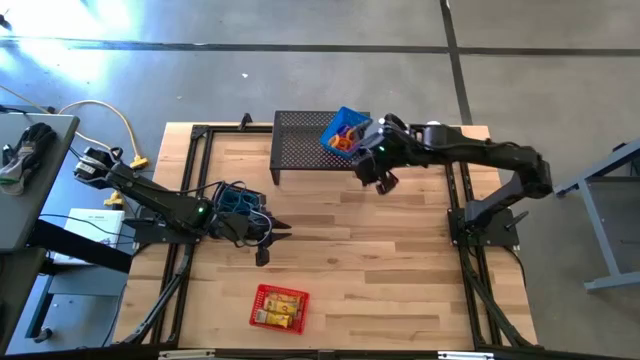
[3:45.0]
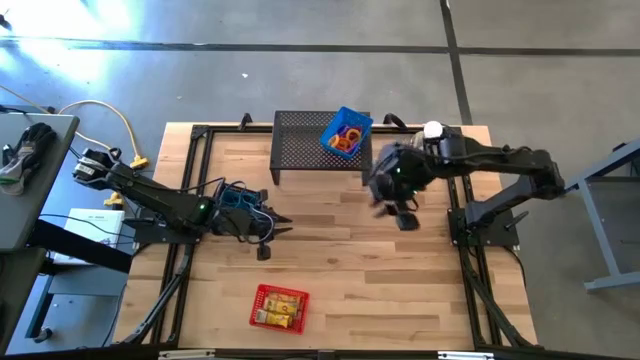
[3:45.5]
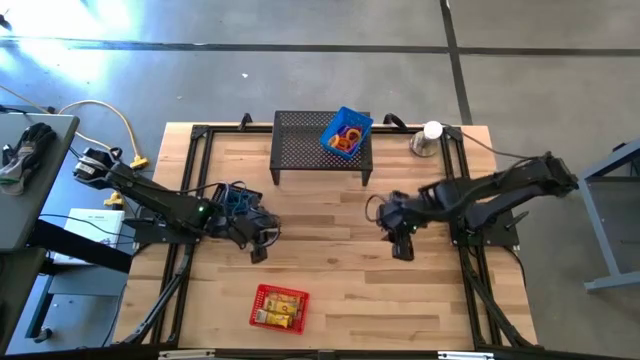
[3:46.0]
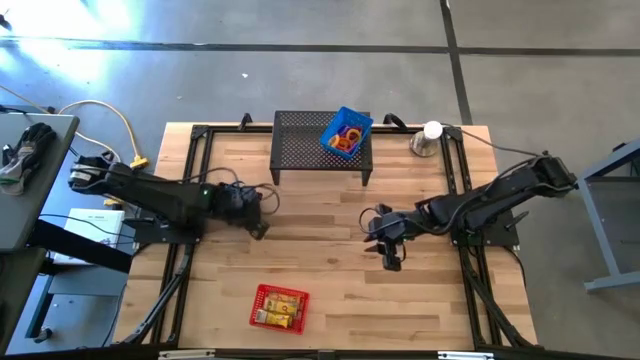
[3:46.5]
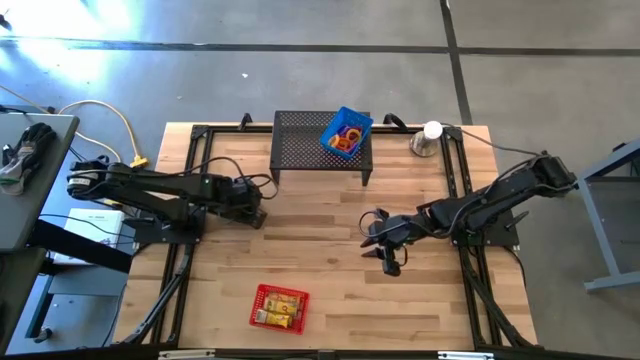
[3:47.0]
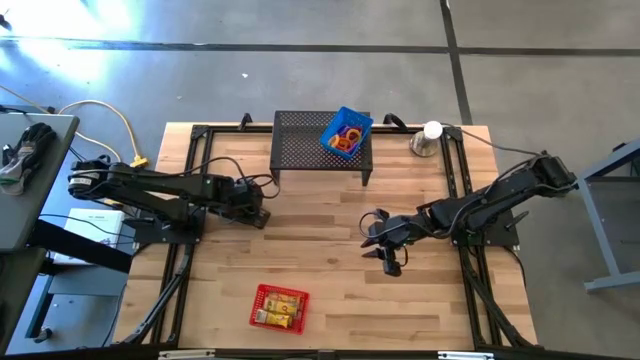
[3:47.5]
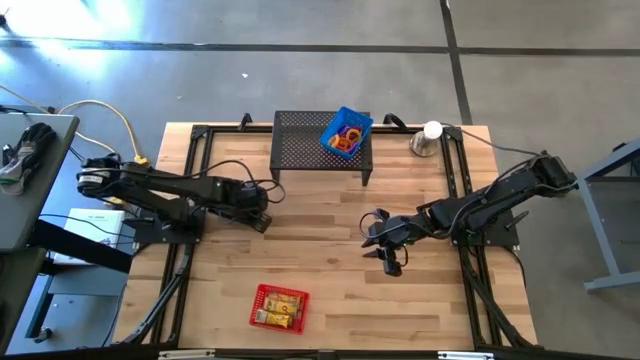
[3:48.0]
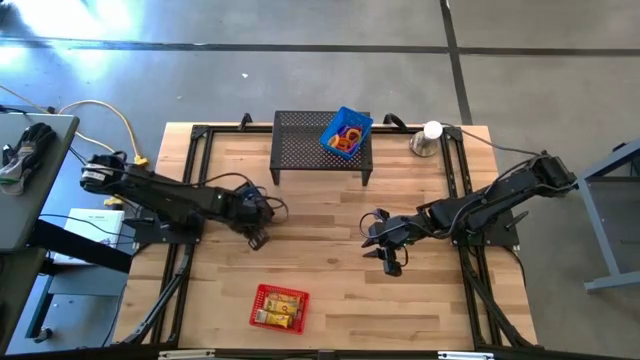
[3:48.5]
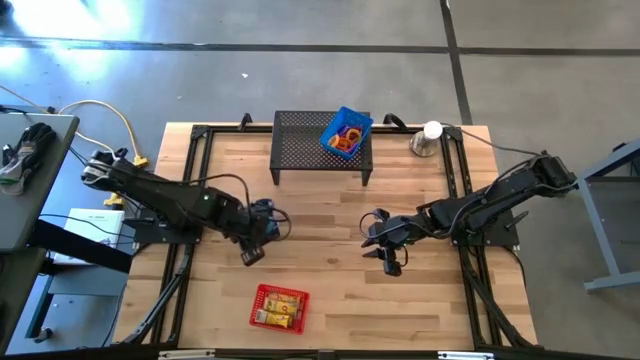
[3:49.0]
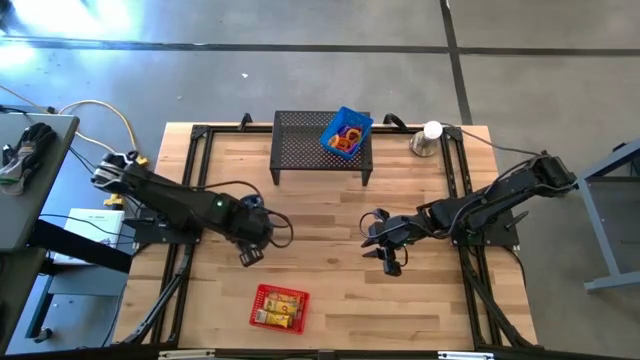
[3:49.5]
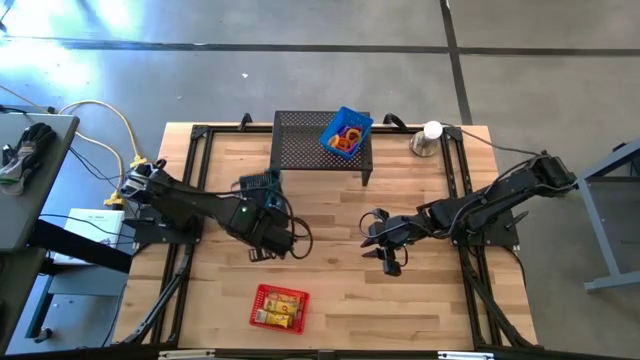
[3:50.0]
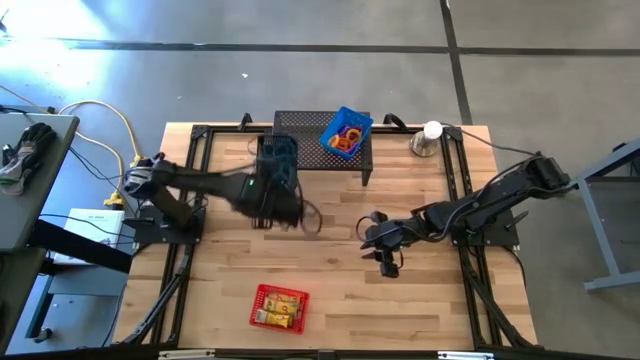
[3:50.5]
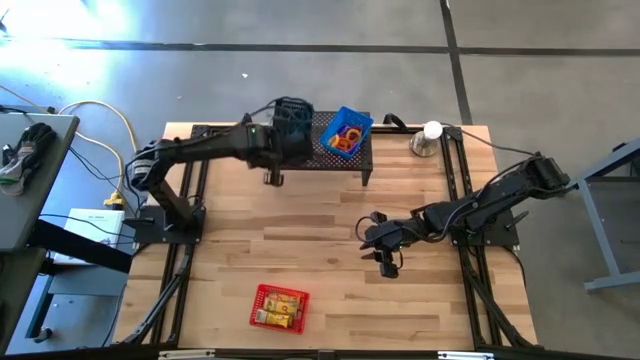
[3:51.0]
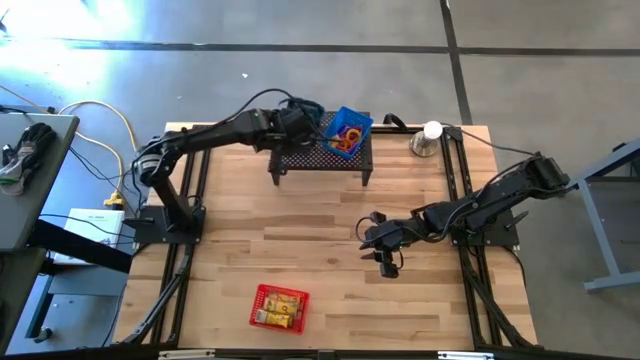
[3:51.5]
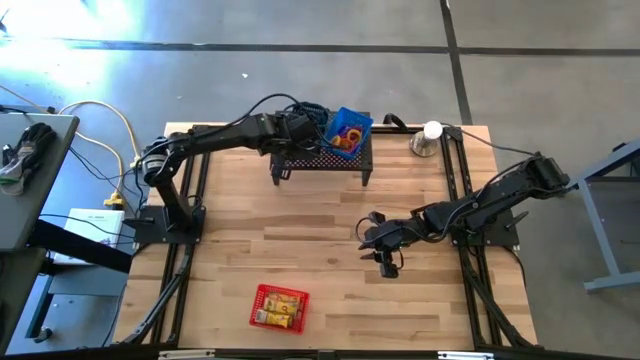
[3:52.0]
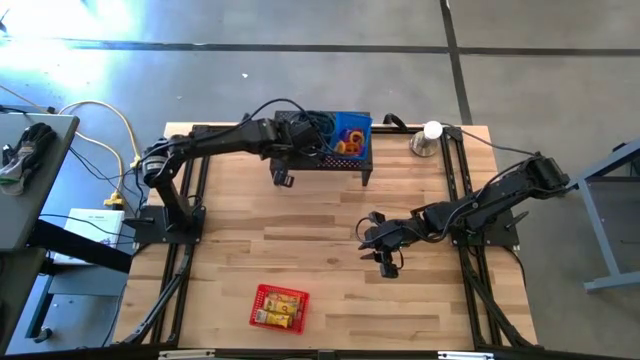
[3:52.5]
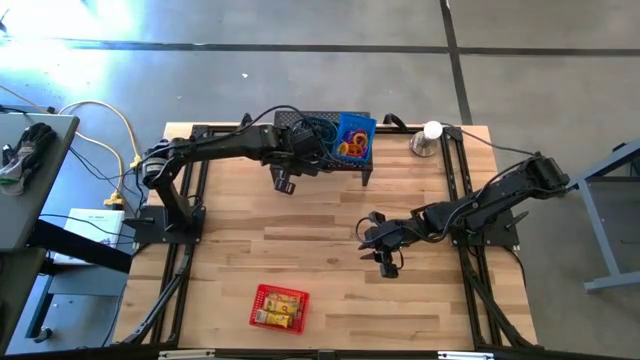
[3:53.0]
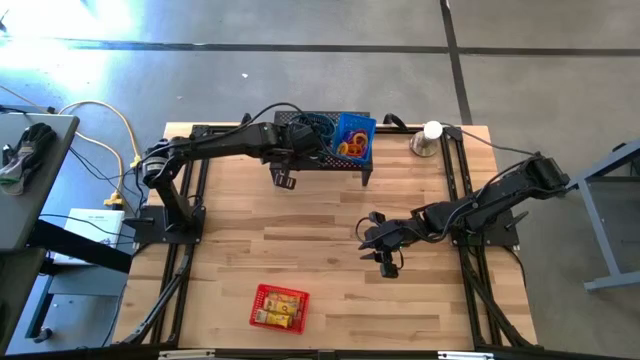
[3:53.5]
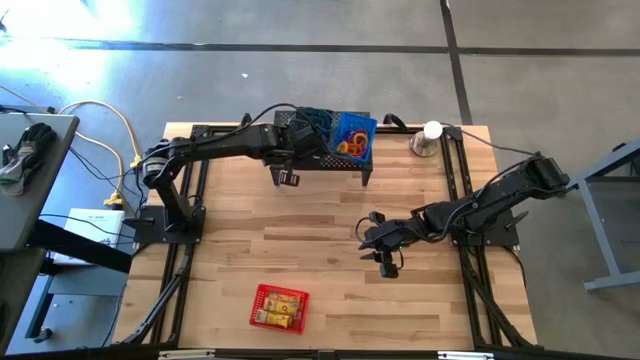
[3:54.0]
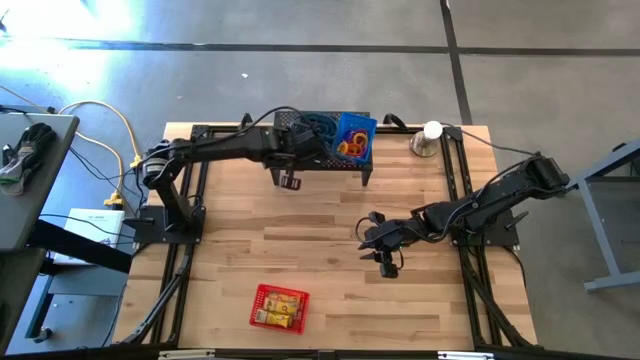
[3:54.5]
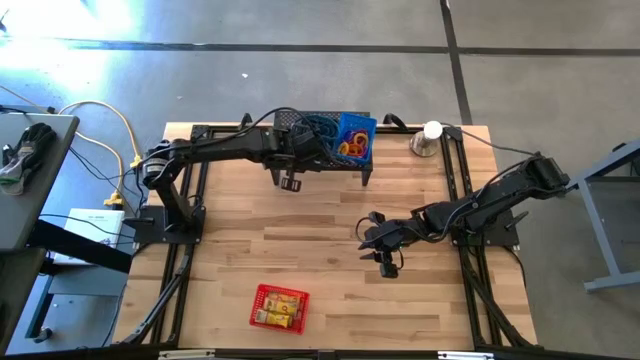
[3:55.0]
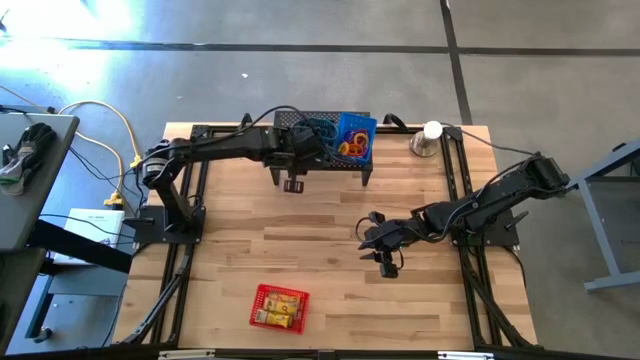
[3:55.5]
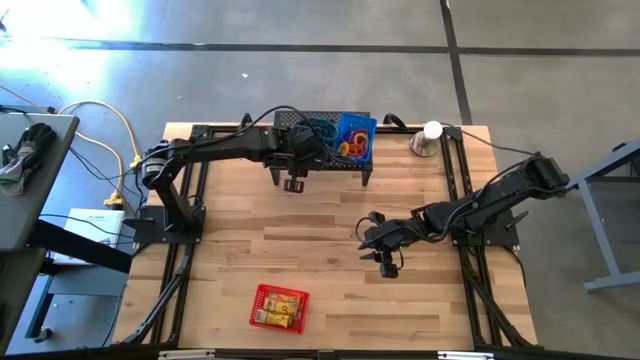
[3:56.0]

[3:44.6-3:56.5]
Task: Pick & Place Office Desk Supplies
Put the black bin with rubber bands on the shelf

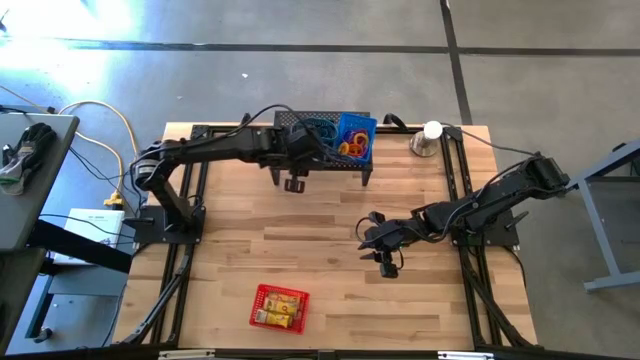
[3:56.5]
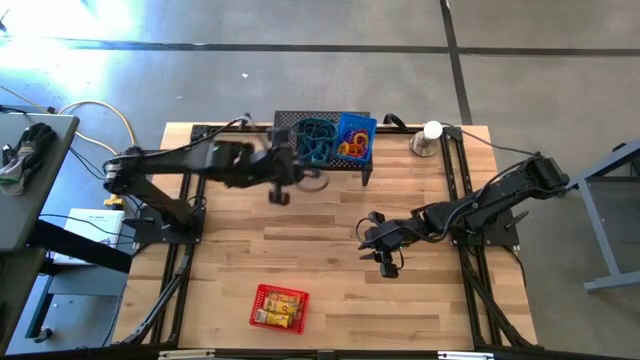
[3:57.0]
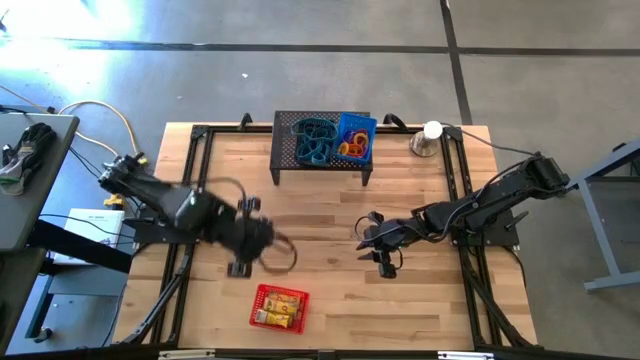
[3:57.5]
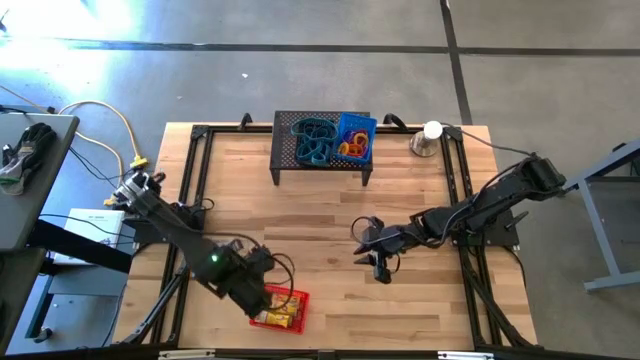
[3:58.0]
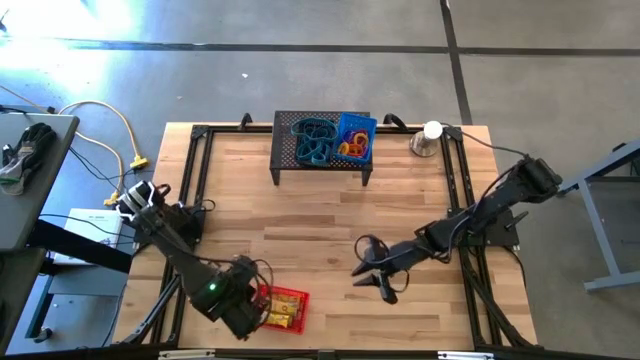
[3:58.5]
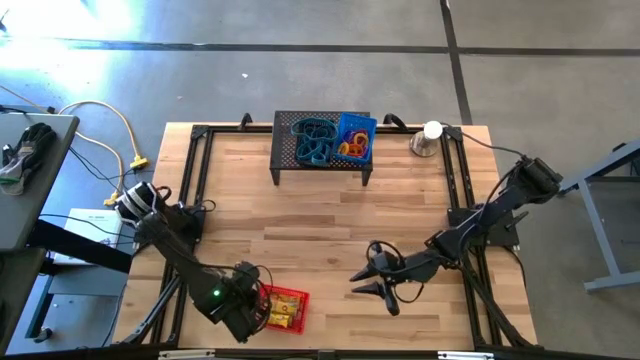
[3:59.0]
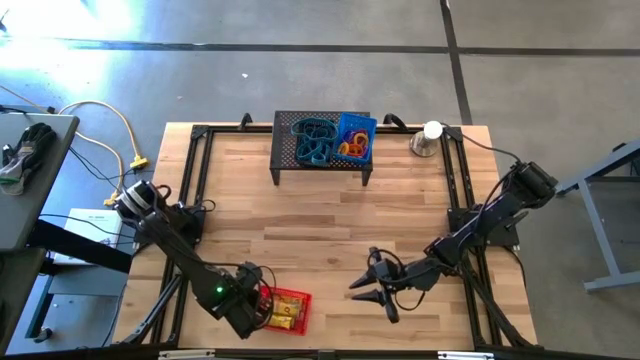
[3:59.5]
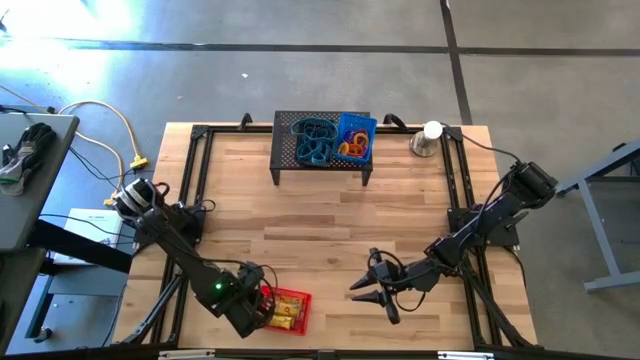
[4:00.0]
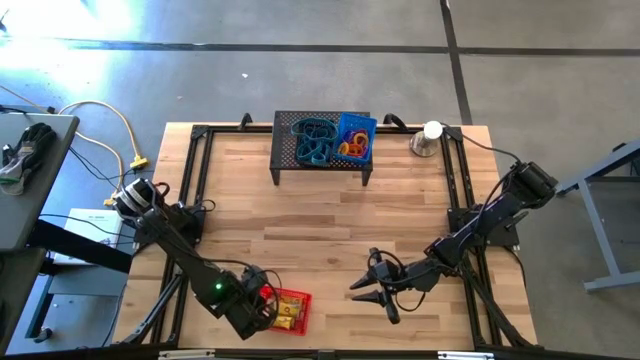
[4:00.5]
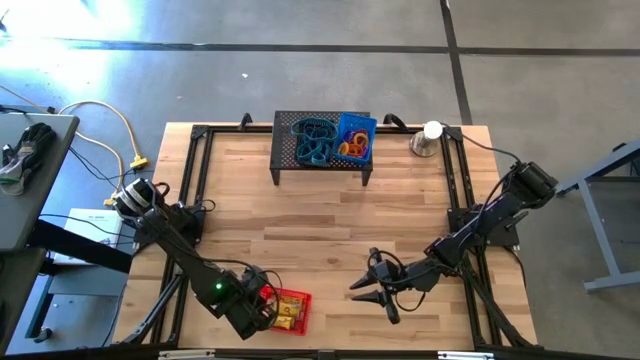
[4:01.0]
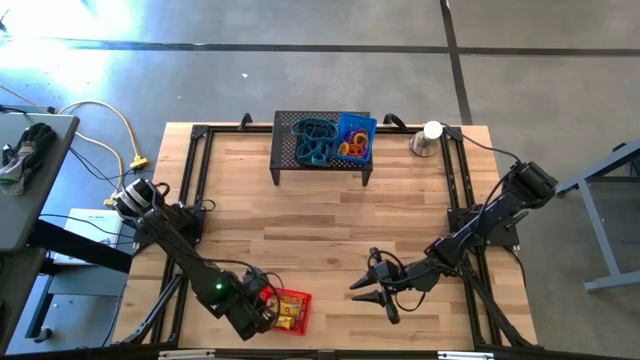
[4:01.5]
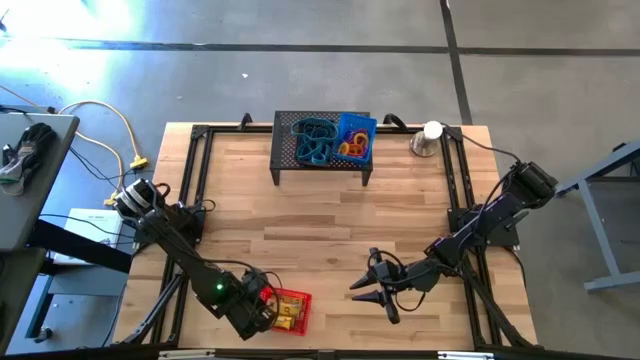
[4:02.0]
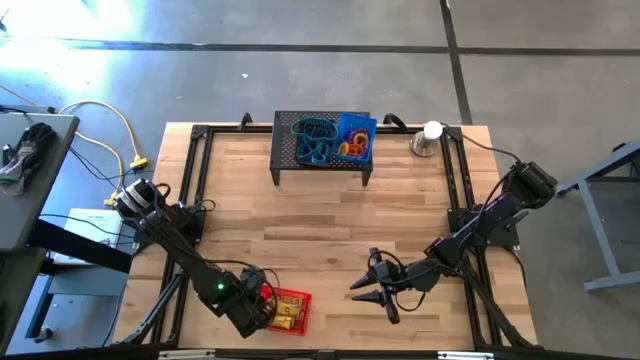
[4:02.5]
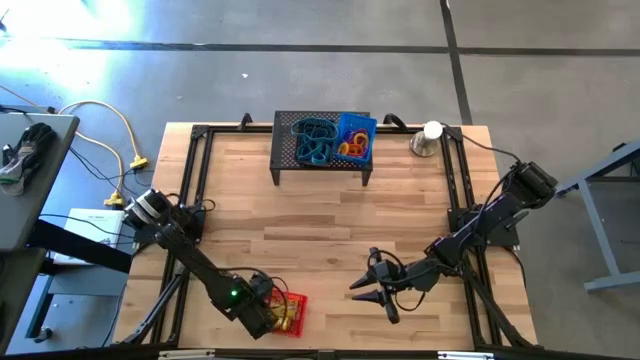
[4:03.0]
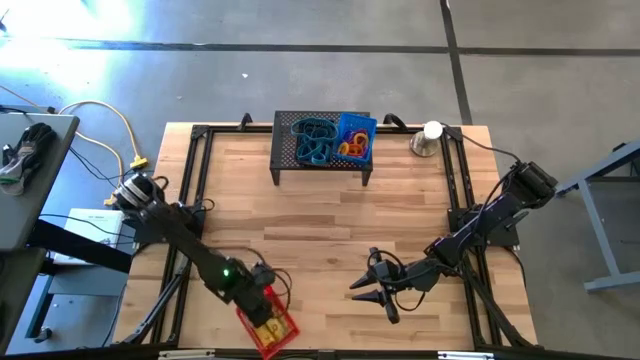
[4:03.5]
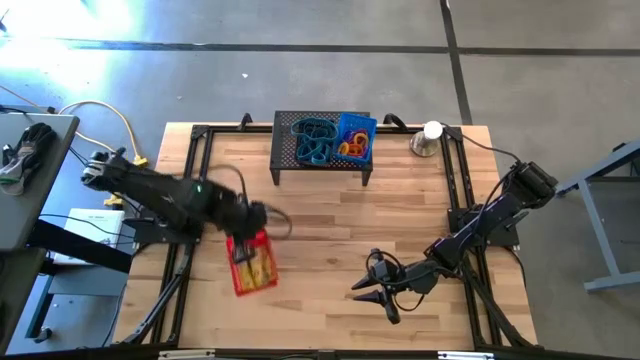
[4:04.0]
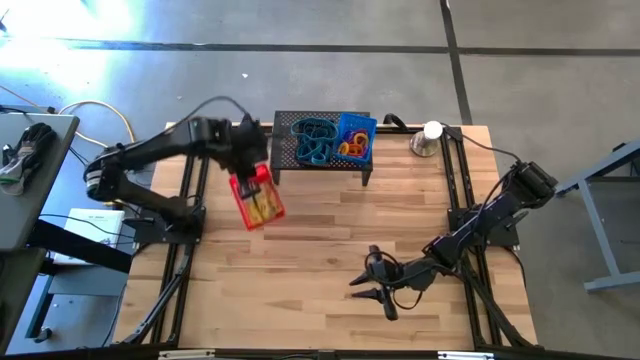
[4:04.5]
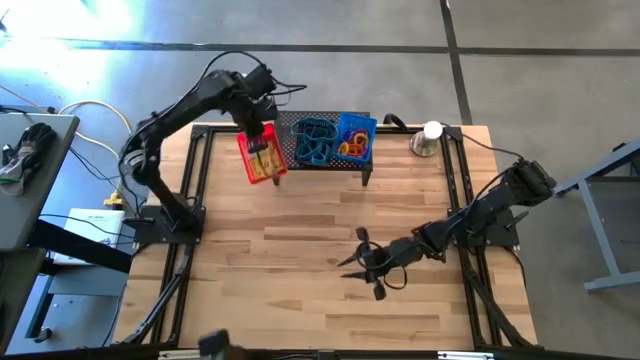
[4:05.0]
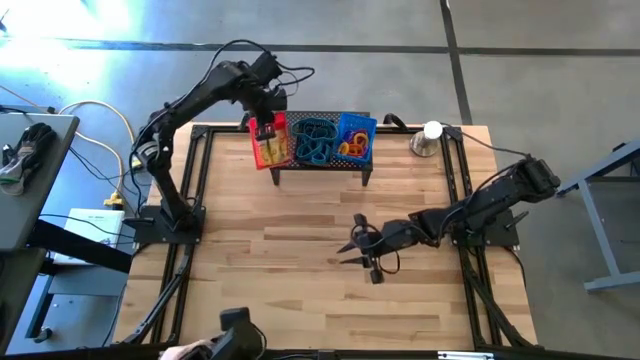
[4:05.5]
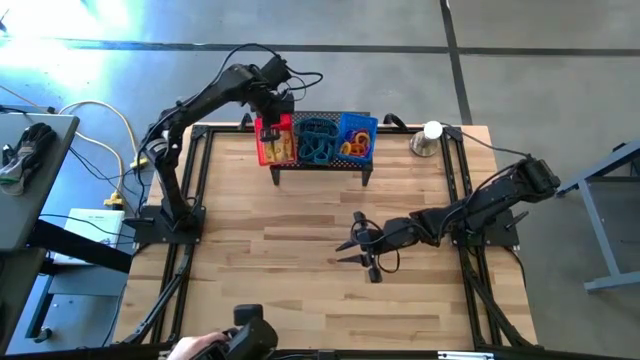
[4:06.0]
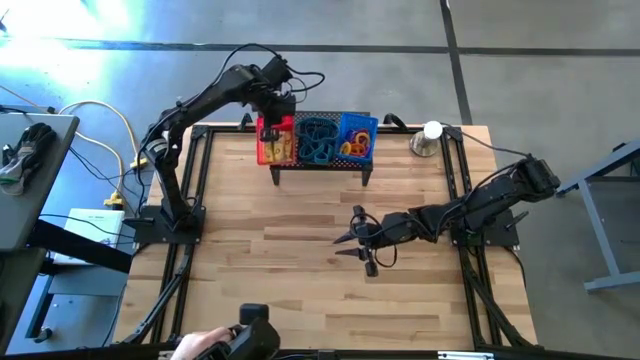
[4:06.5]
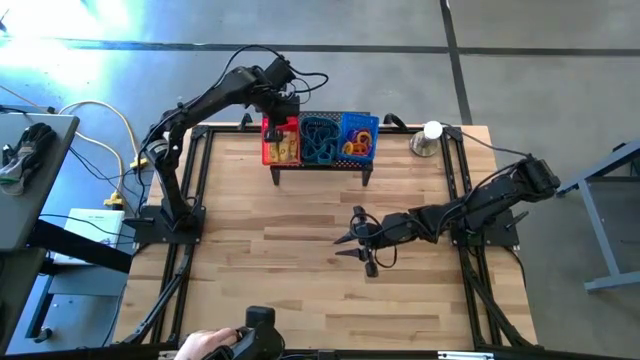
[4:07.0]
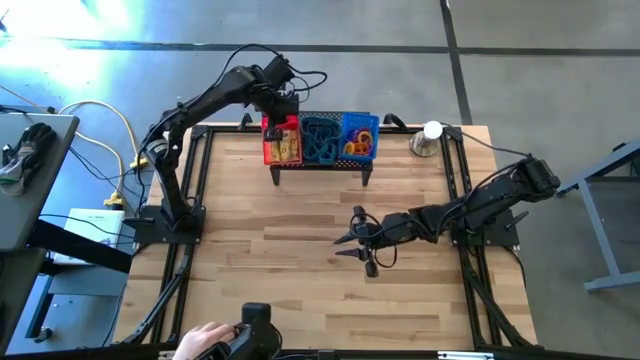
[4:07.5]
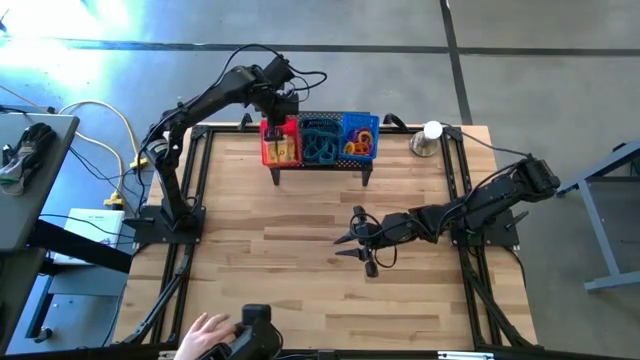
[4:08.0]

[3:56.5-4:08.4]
Put the red bin with crayon boxes on the shelf
